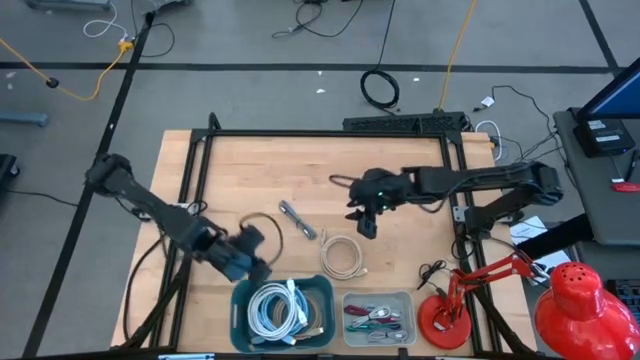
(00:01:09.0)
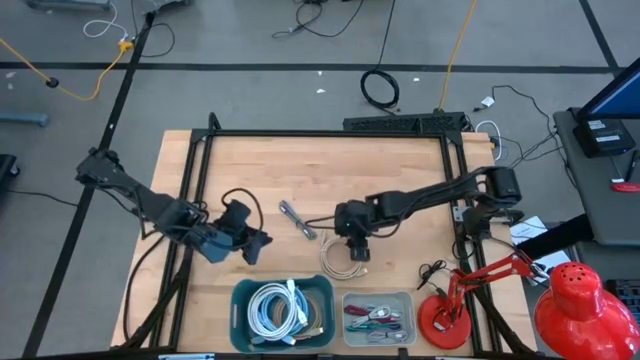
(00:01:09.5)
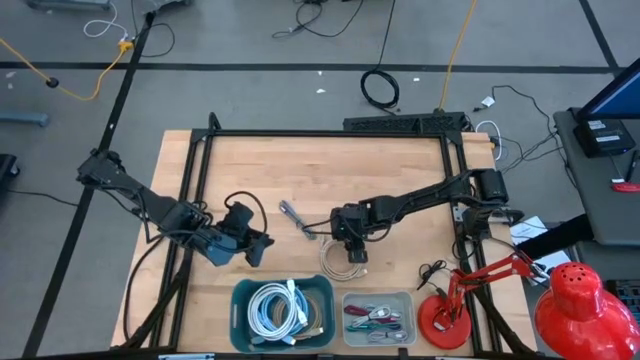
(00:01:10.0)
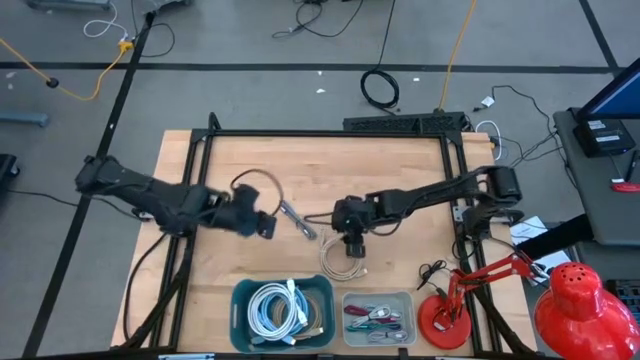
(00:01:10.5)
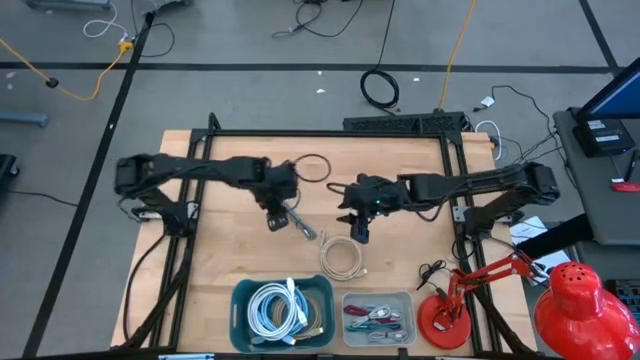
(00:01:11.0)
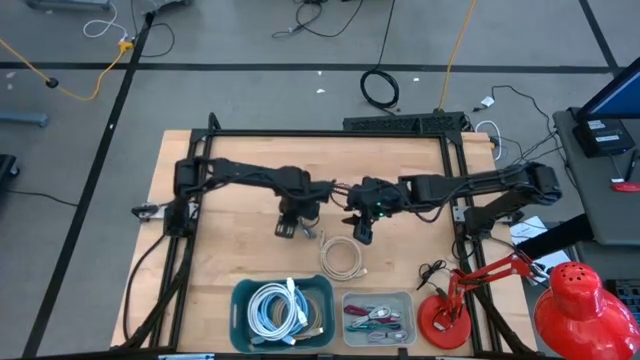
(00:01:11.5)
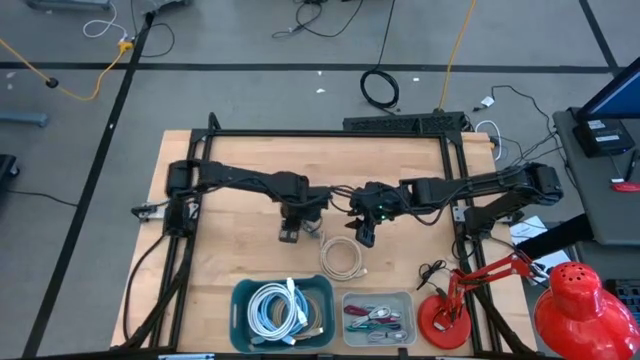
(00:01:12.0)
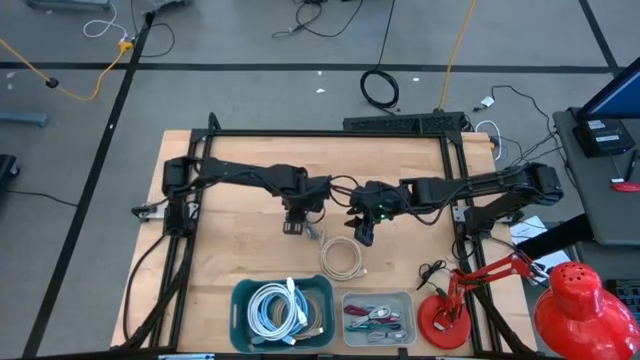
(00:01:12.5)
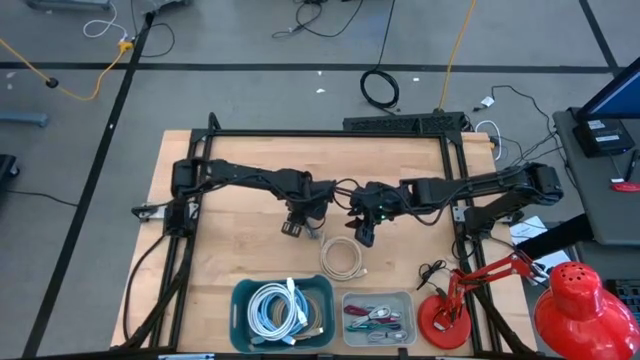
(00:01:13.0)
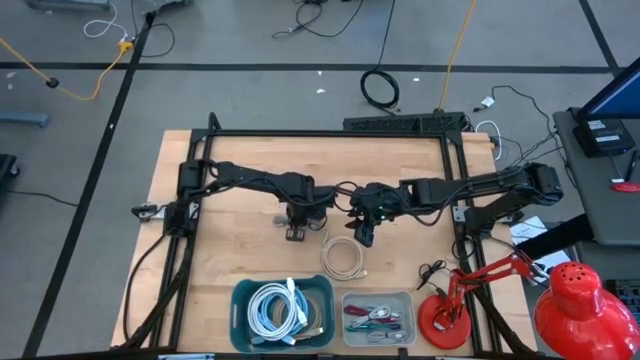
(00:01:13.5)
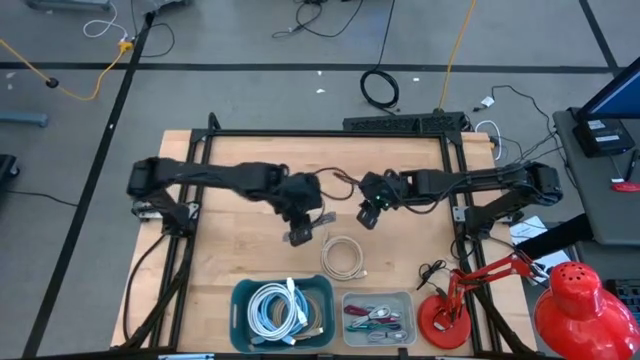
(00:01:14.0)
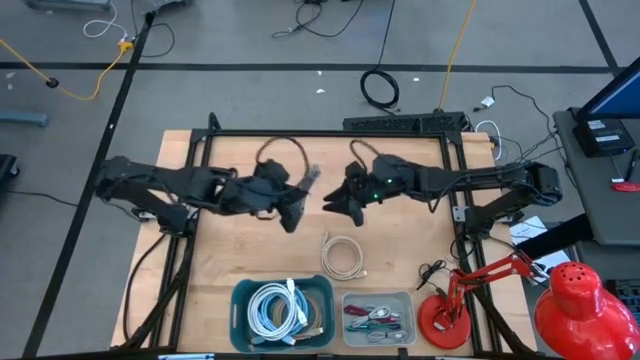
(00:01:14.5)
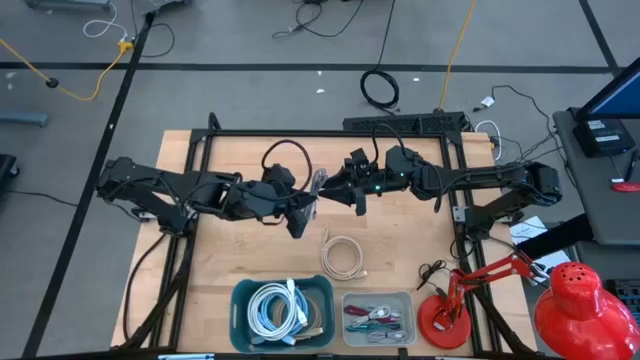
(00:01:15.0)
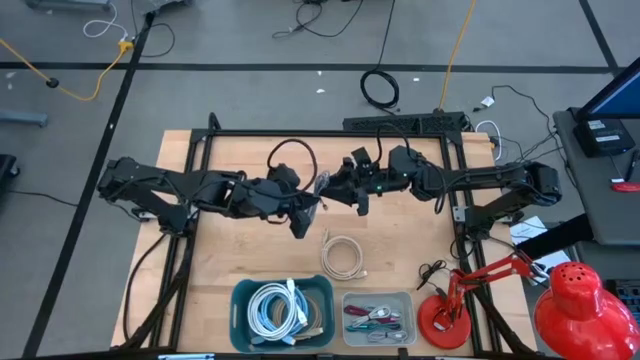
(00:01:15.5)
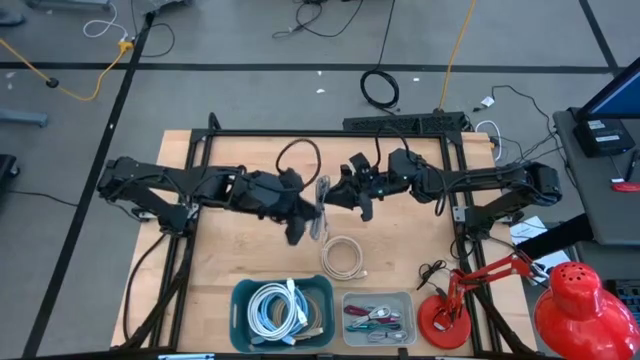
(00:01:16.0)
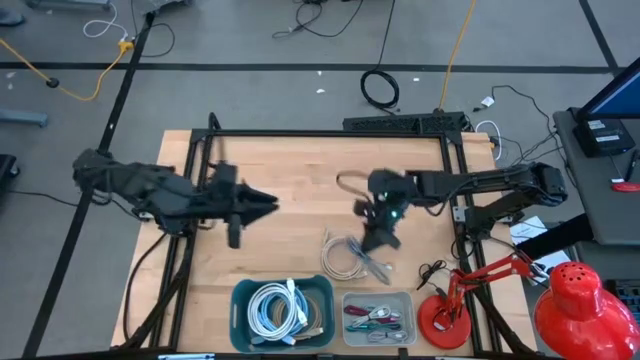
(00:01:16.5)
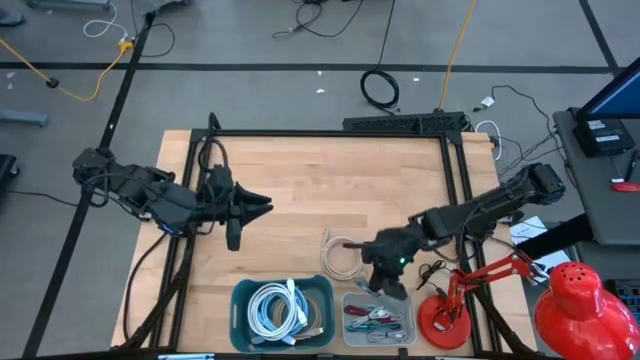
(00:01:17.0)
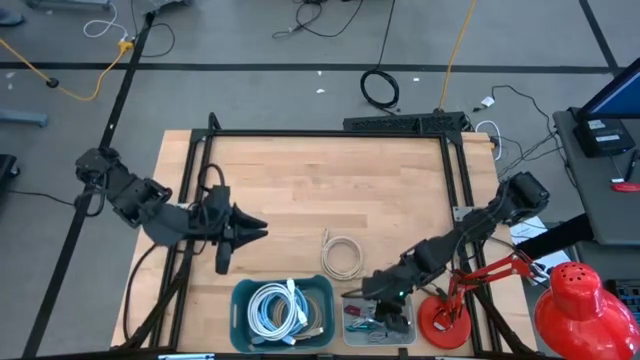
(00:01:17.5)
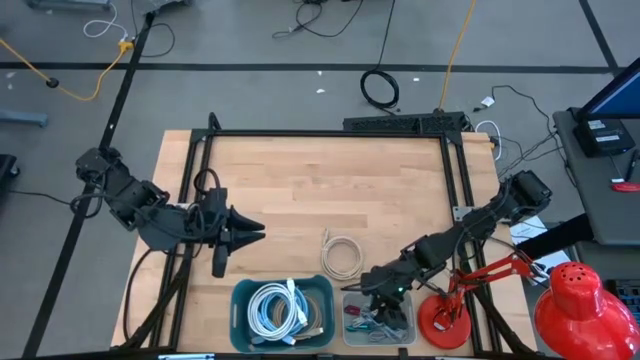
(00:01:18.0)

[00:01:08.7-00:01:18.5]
Task: Pick & Place USB Port
Put the small black charger cable into the grey bin

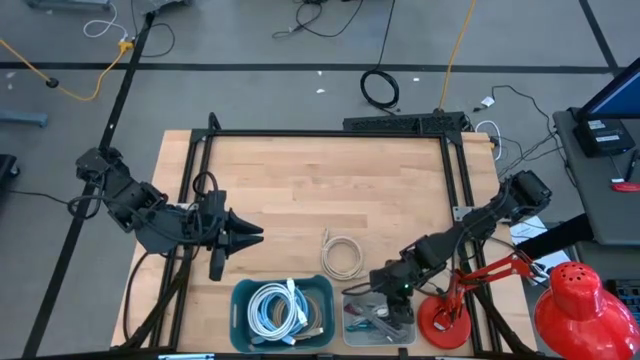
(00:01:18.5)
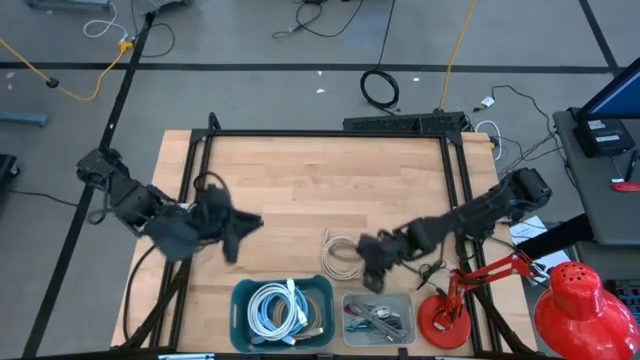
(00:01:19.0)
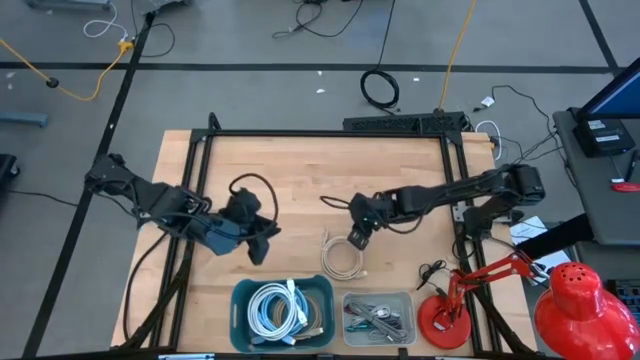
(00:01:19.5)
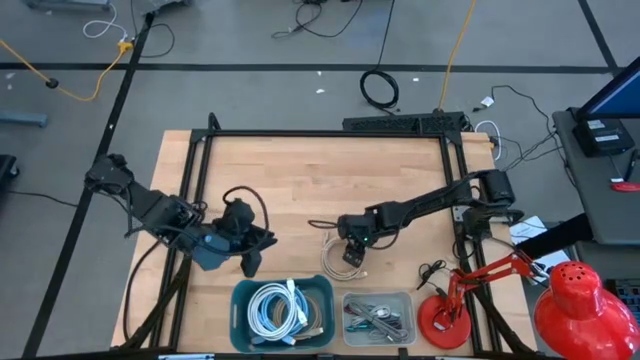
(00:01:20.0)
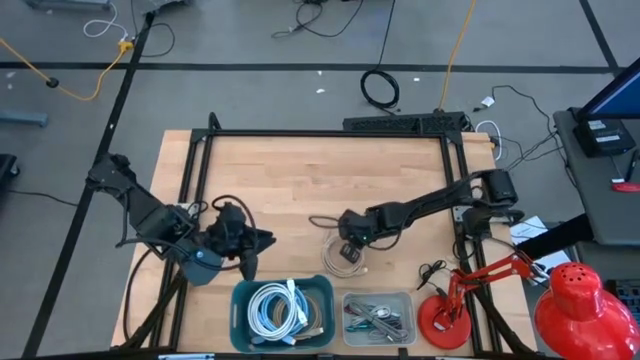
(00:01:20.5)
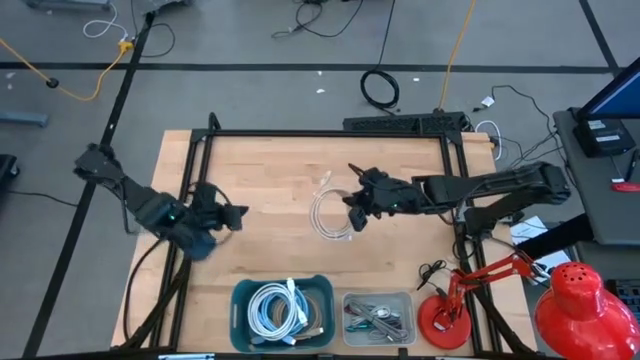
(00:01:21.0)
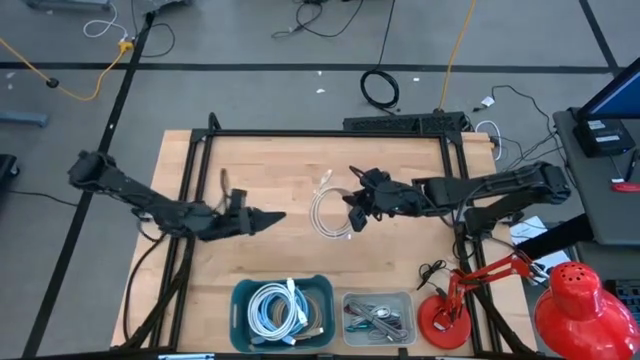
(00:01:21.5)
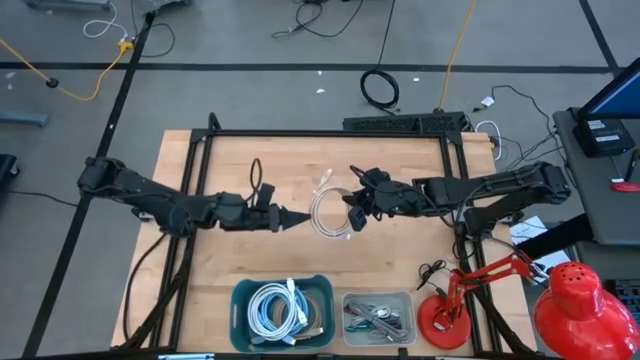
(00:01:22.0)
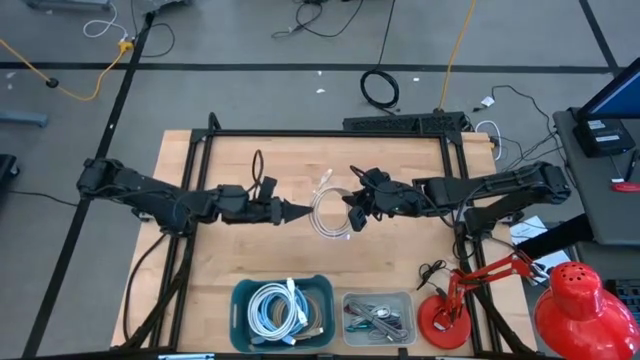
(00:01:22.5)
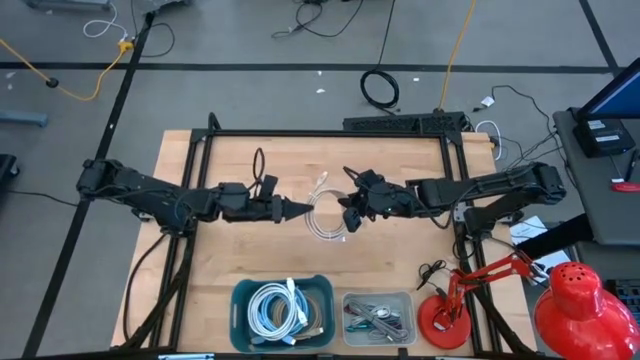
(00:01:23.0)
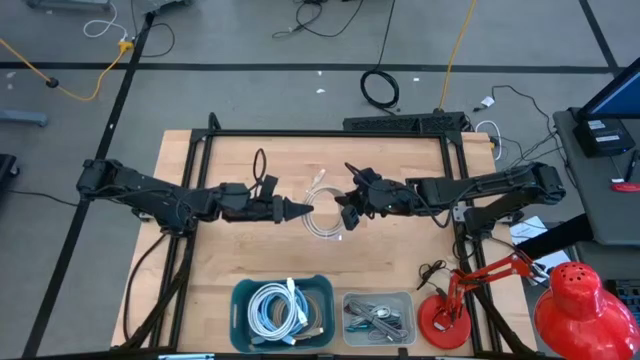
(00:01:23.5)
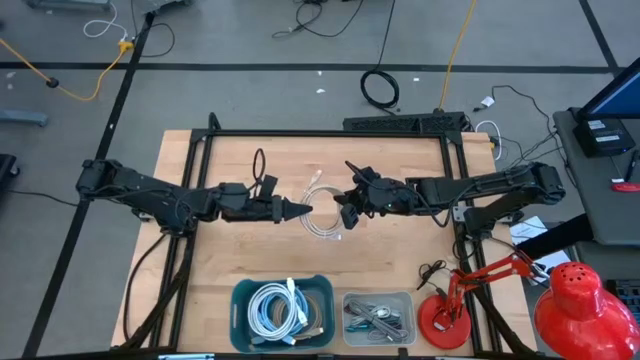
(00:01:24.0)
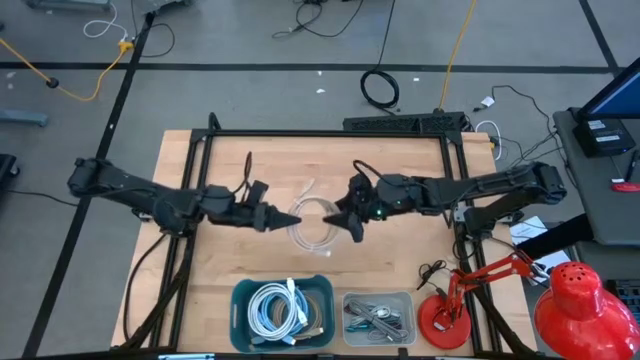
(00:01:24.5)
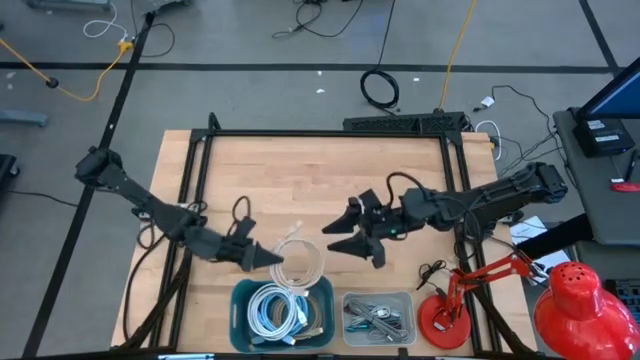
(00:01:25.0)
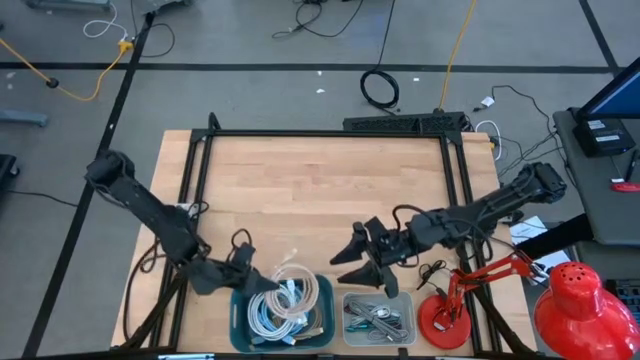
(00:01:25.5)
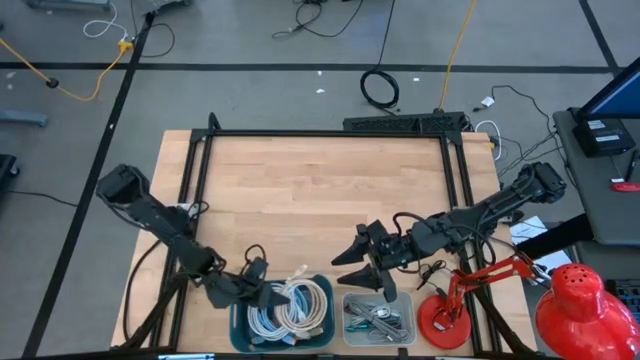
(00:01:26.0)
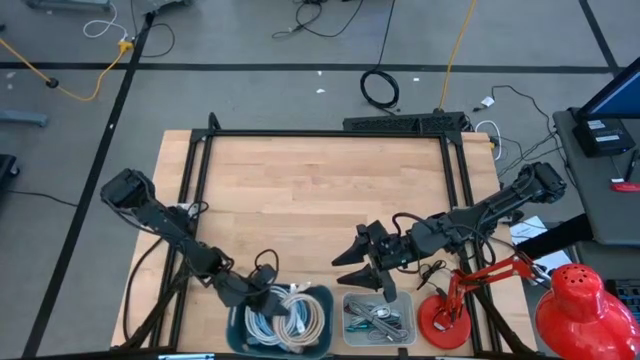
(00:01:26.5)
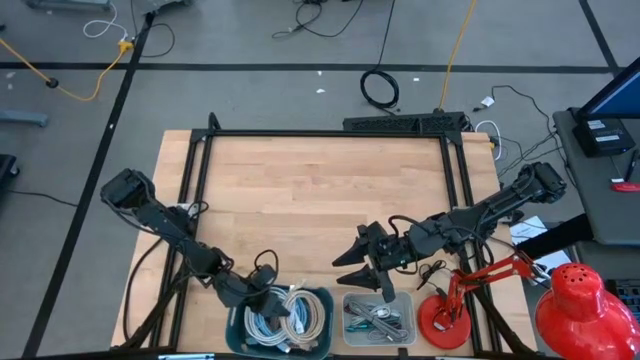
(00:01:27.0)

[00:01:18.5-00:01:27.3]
Put the large brown charger cable into the dark blue bin

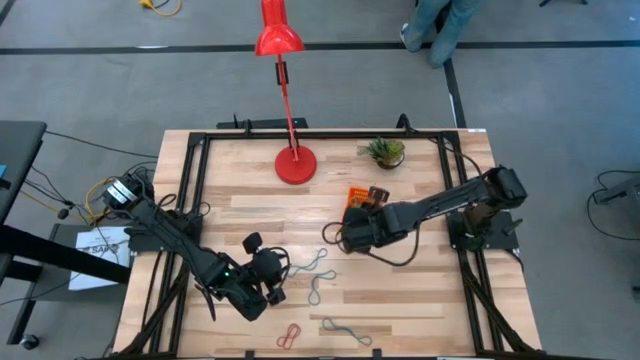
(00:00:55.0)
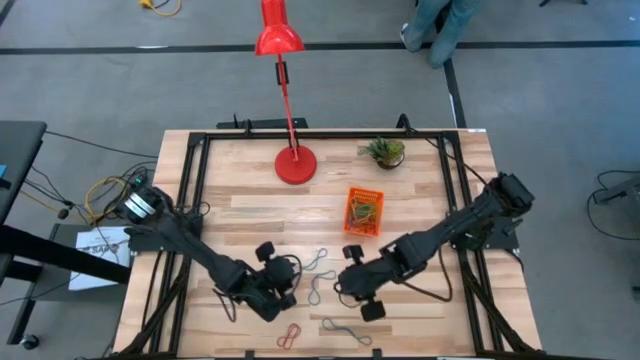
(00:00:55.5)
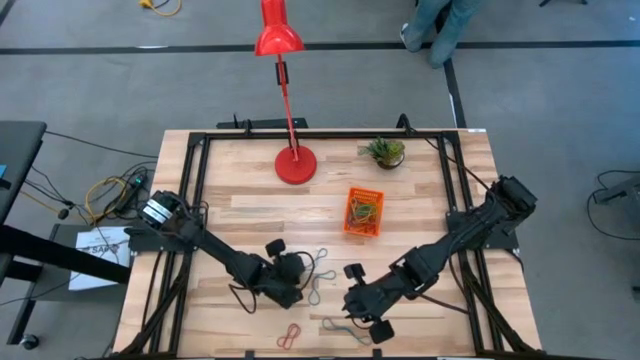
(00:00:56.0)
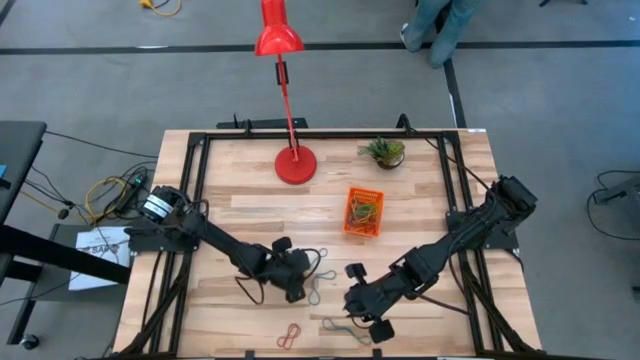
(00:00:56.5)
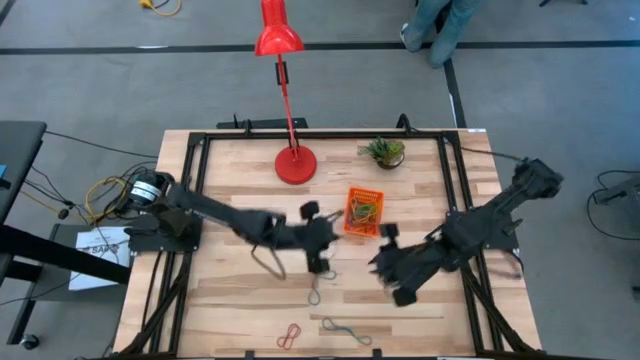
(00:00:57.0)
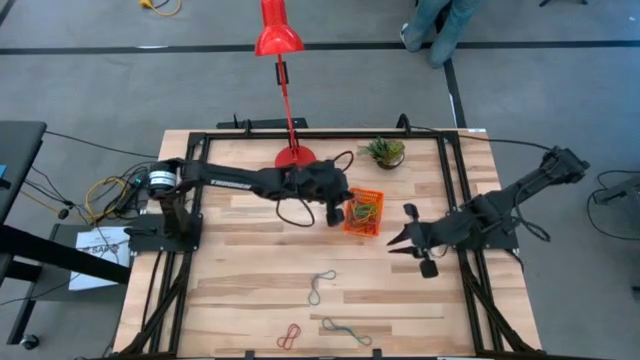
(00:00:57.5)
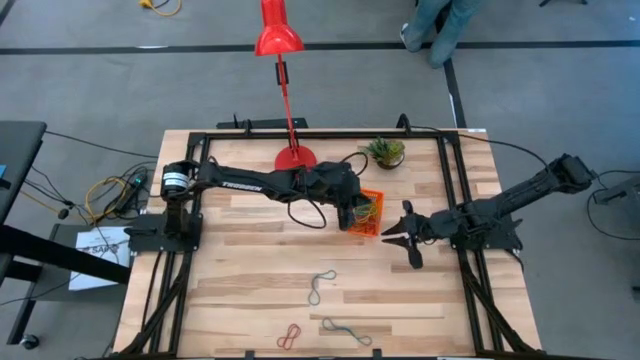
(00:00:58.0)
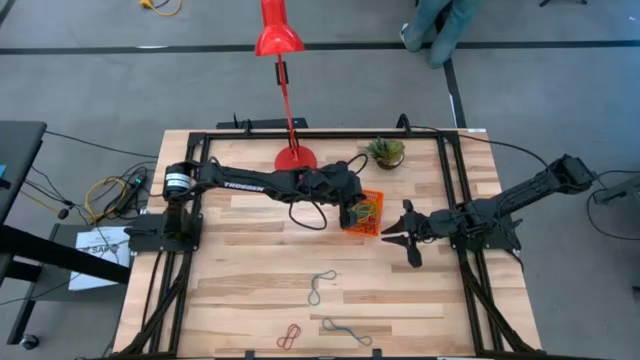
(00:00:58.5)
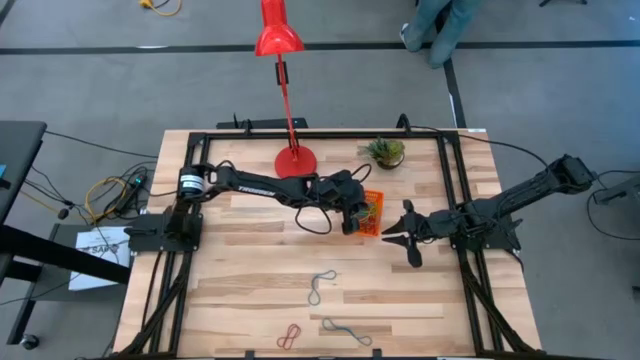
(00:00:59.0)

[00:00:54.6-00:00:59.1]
Task: Pick and place items into bin
Put the top blue rubberband into the orange basket
